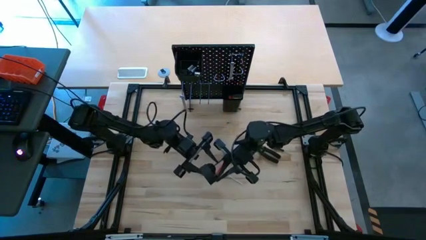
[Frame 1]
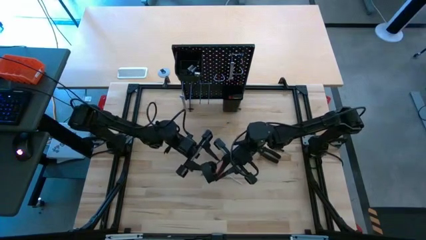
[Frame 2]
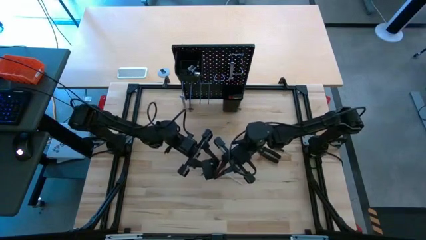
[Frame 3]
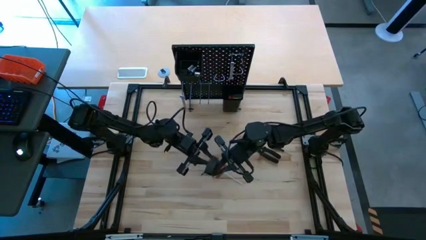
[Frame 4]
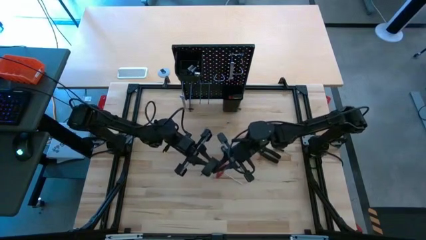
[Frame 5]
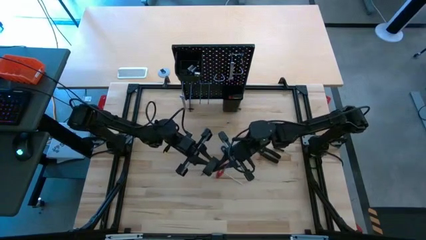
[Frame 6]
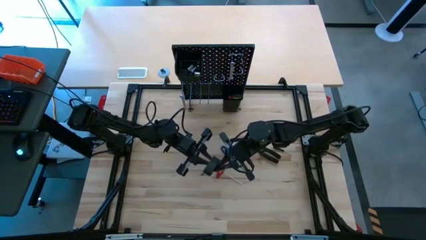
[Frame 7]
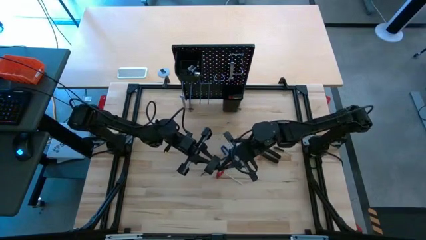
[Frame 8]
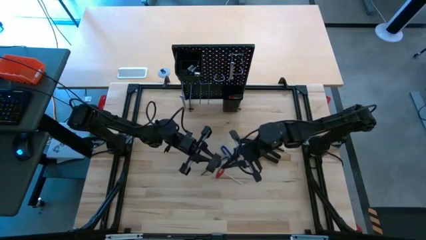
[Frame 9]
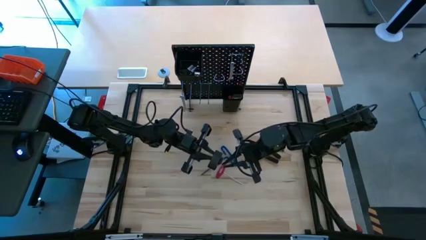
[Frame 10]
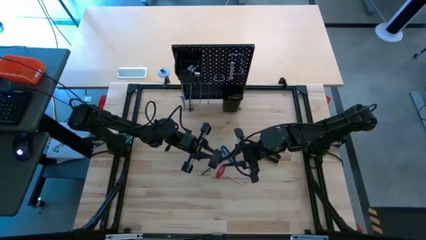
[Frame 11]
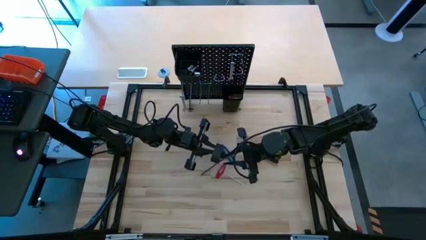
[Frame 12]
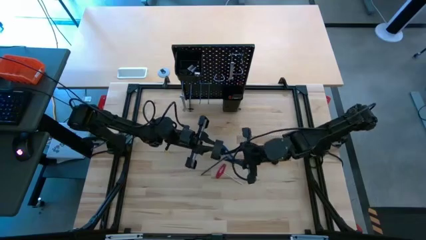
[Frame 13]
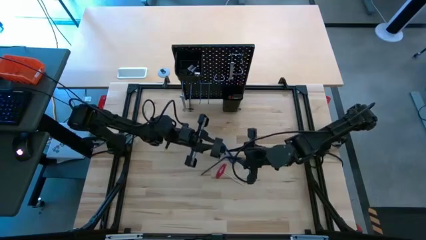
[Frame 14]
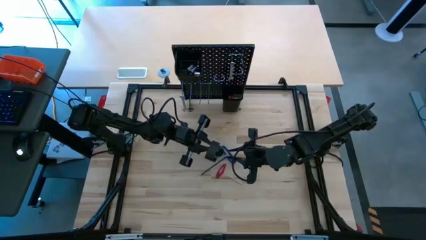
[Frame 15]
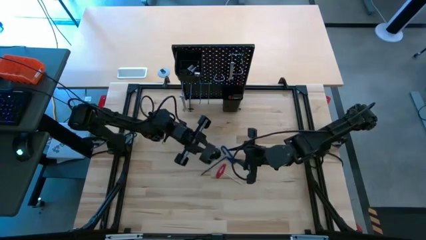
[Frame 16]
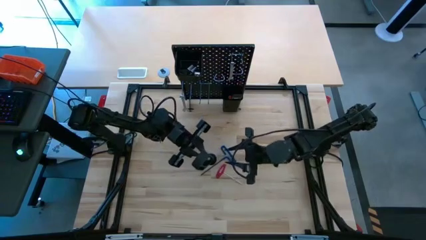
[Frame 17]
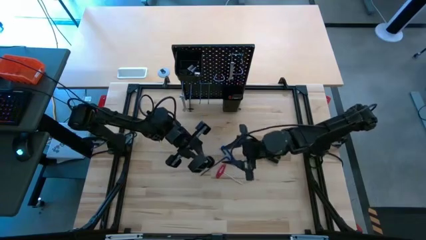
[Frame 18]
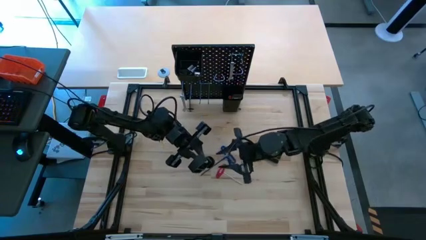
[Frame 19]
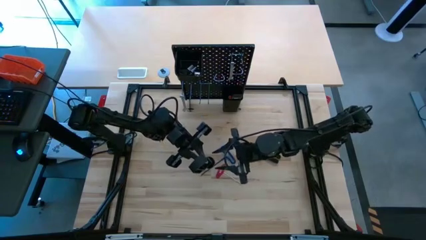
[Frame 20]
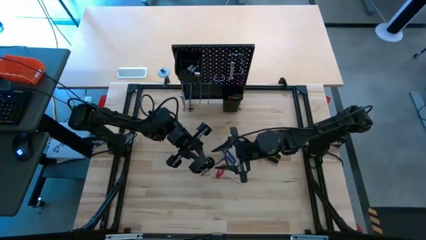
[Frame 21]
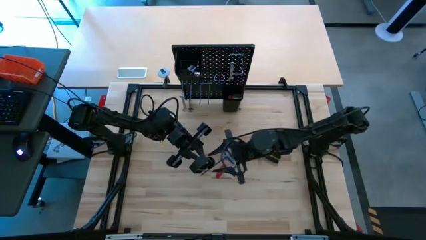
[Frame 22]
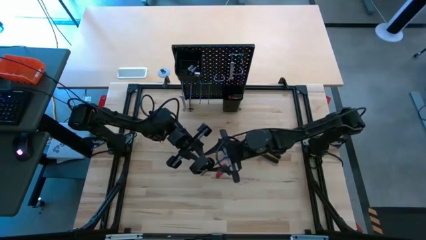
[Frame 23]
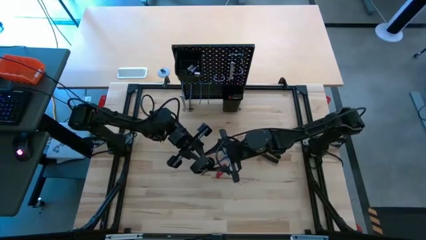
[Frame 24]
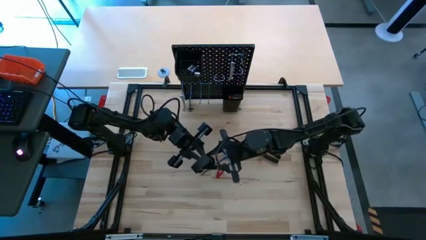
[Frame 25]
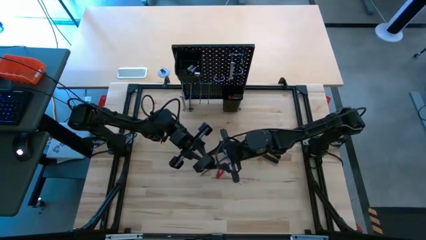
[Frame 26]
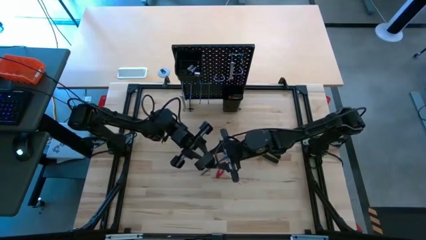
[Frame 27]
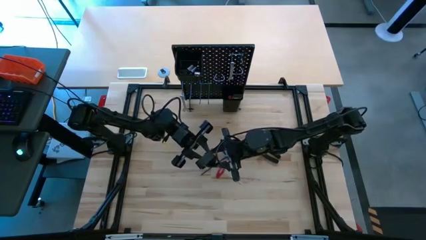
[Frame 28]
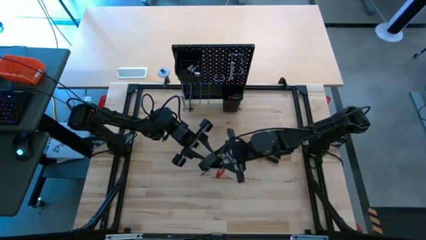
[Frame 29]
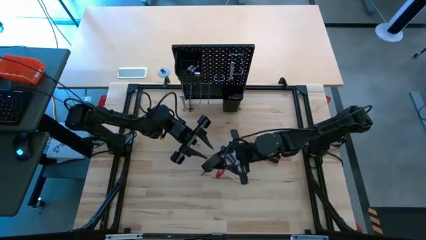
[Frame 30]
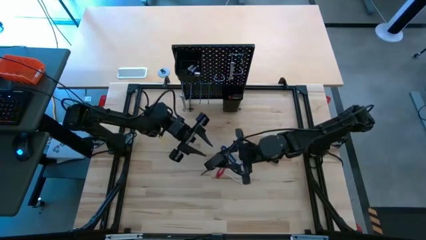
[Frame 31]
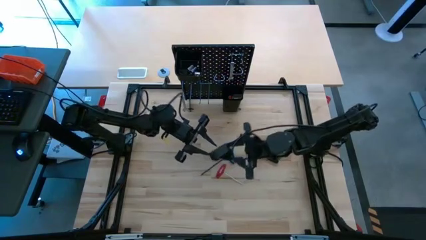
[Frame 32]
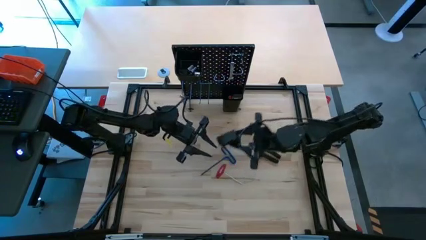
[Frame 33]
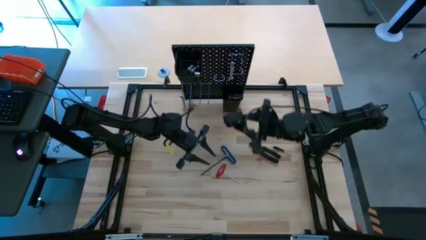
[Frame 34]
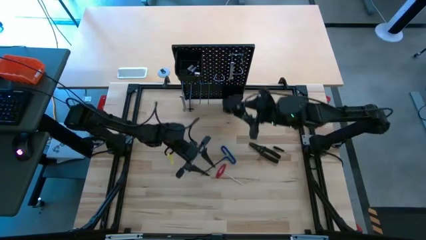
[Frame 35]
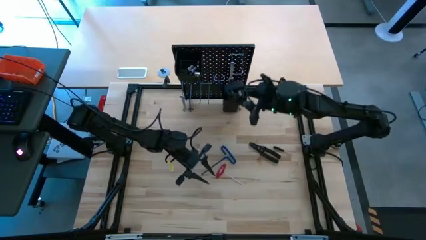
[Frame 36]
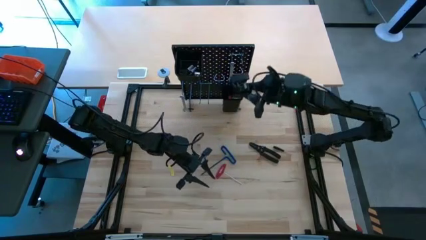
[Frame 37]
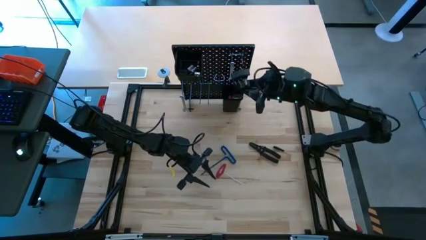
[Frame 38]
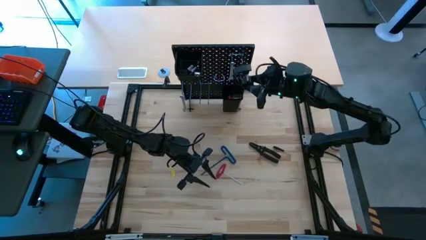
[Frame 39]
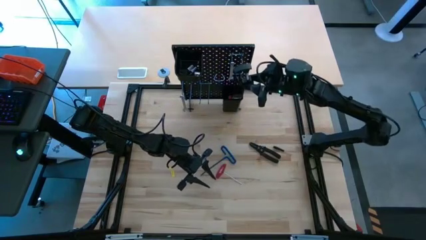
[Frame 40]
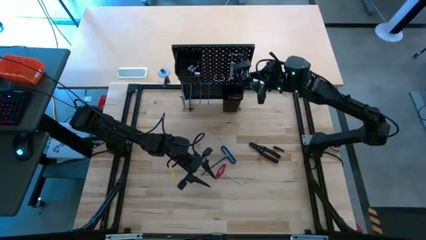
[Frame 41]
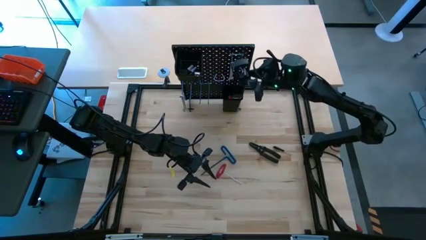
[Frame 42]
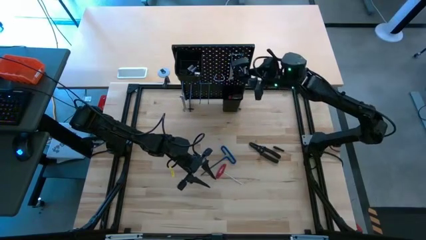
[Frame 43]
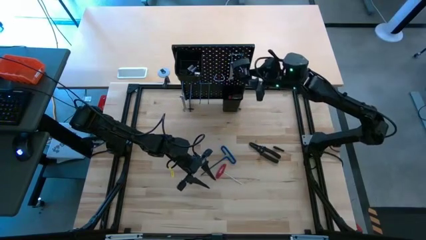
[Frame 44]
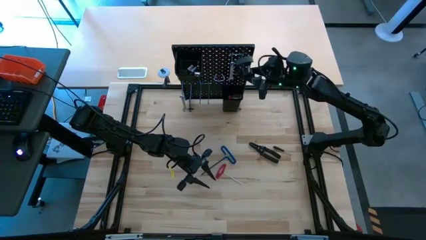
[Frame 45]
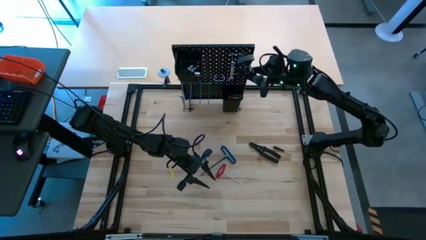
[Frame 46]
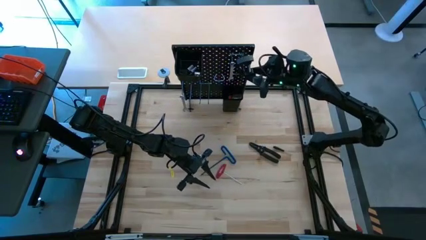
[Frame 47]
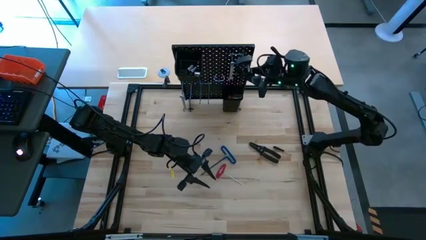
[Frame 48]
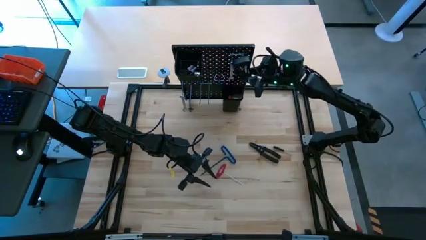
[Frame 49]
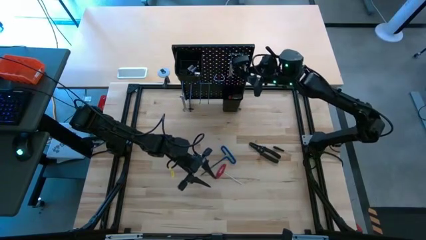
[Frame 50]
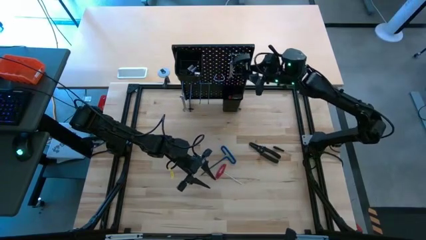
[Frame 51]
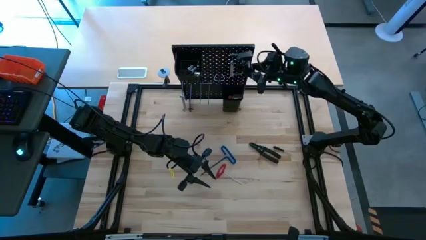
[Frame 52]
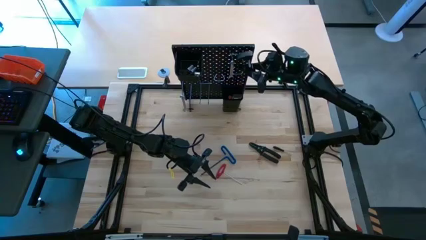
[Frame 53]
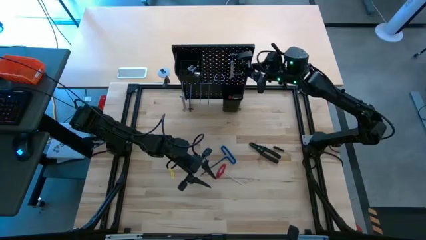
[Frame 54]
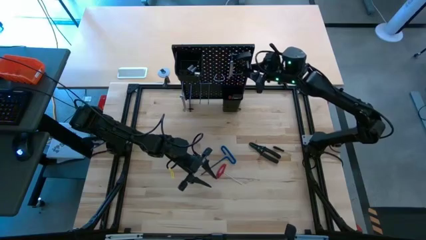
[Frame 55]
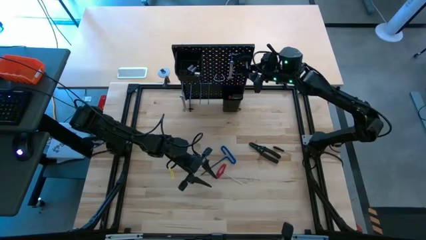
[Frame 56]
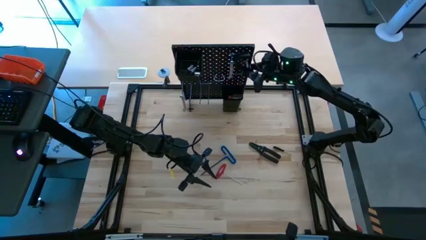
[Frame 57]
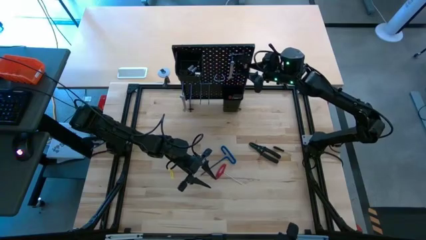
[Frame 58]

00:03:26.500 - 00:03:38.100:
Task: Hang tools onto peg board
Hang the clamp on the pegboard
